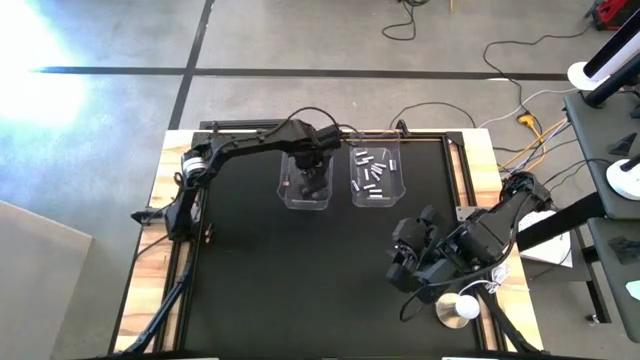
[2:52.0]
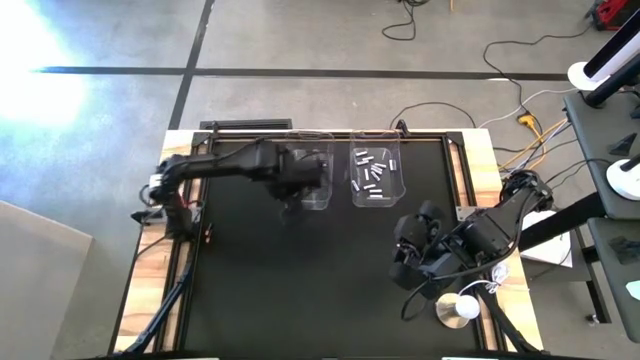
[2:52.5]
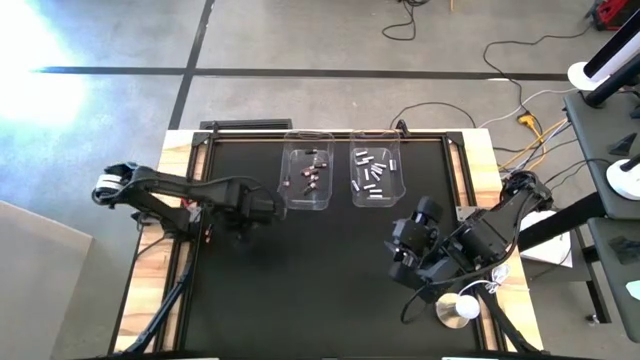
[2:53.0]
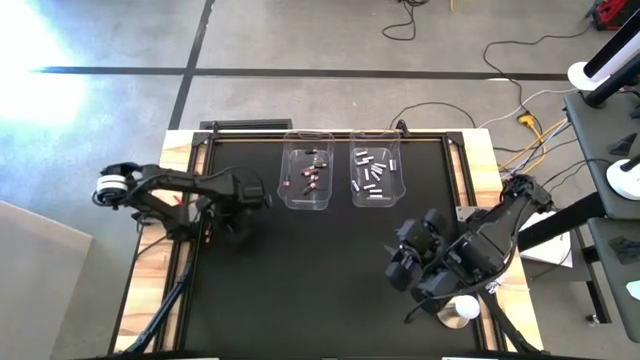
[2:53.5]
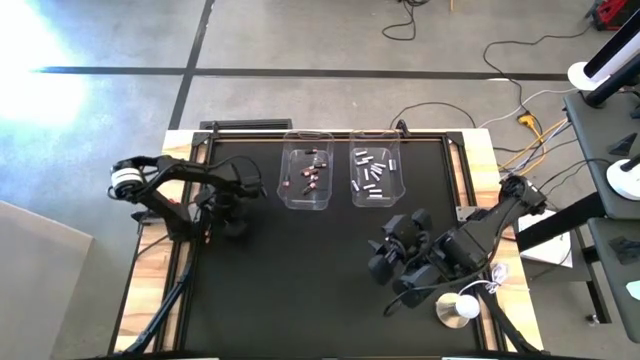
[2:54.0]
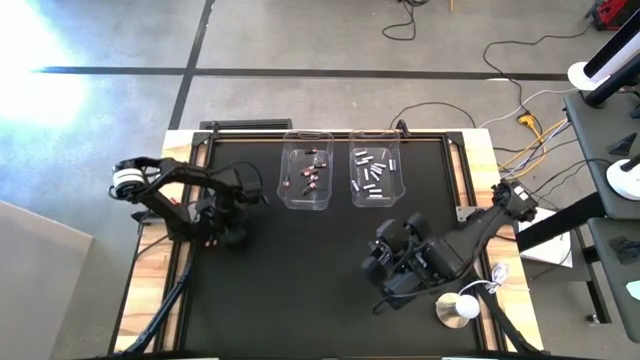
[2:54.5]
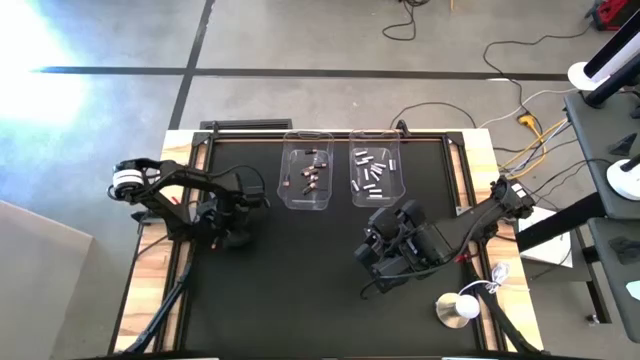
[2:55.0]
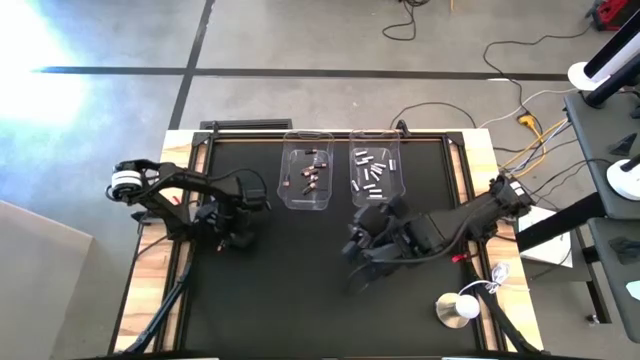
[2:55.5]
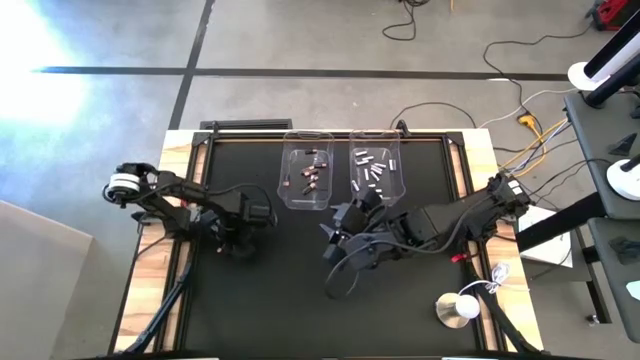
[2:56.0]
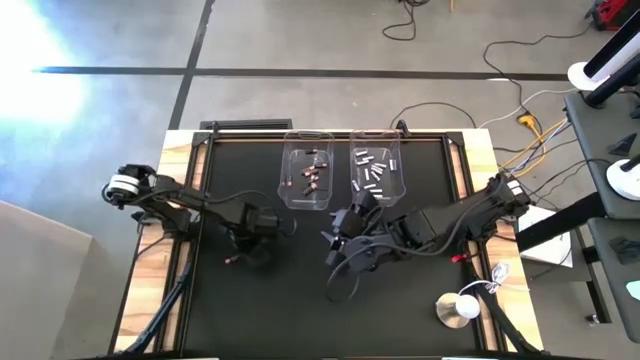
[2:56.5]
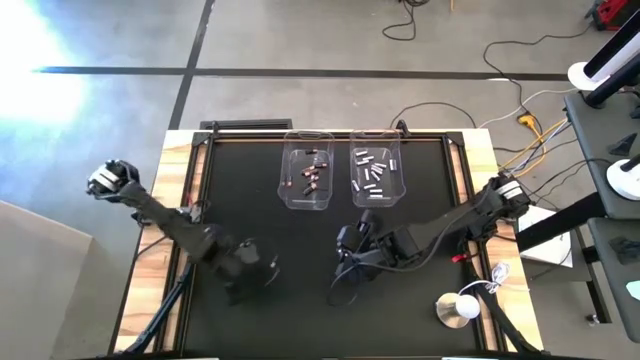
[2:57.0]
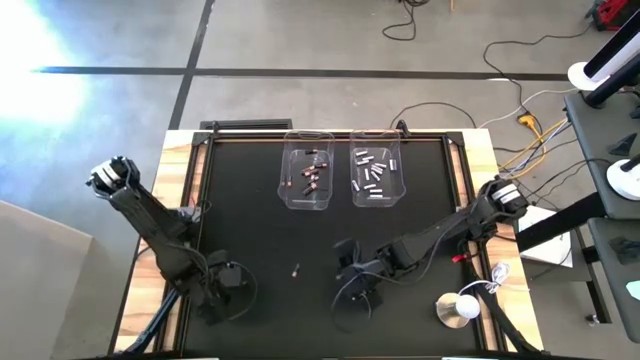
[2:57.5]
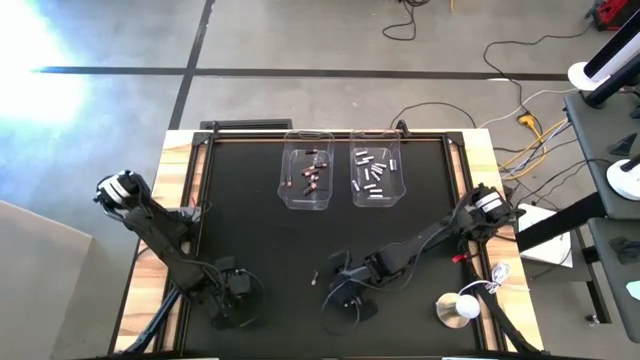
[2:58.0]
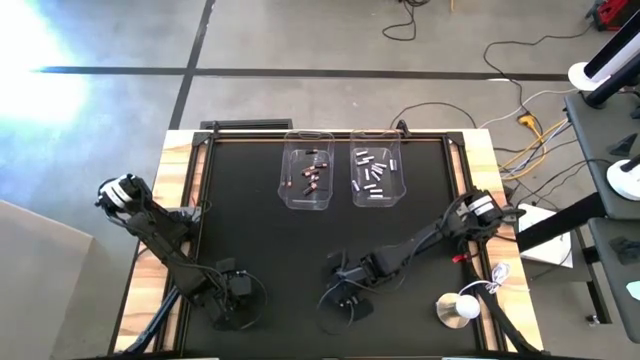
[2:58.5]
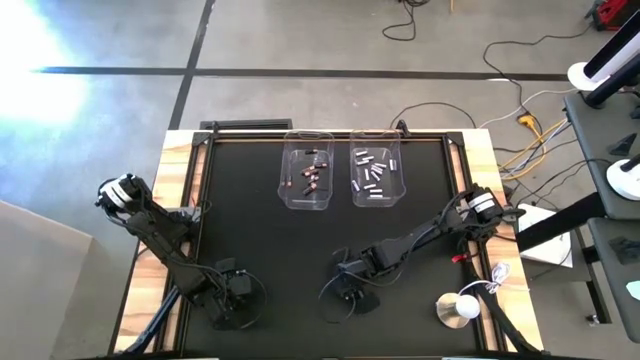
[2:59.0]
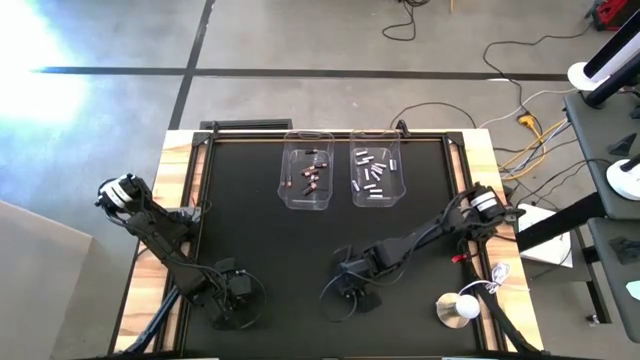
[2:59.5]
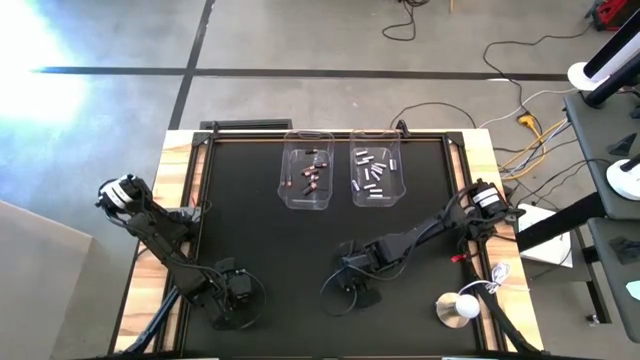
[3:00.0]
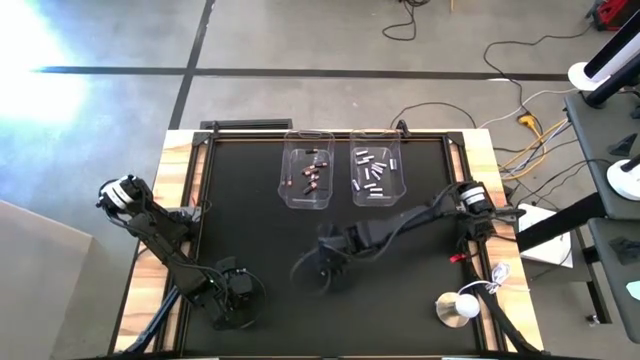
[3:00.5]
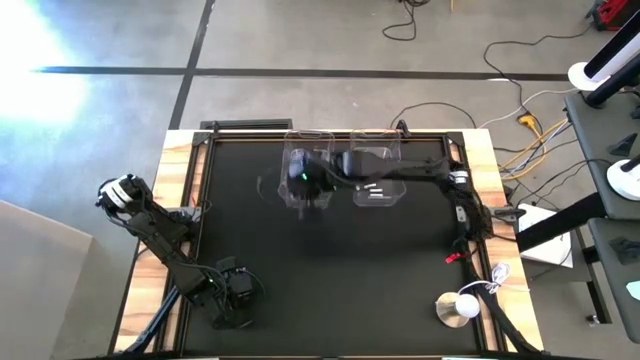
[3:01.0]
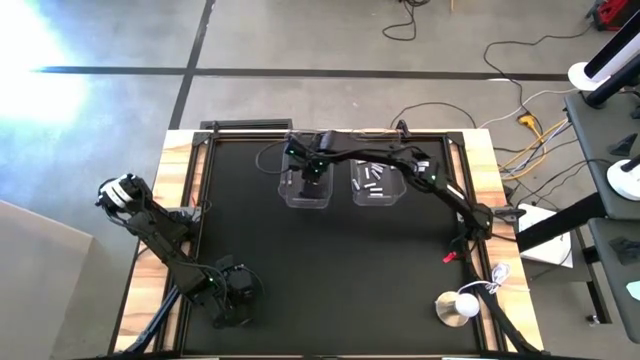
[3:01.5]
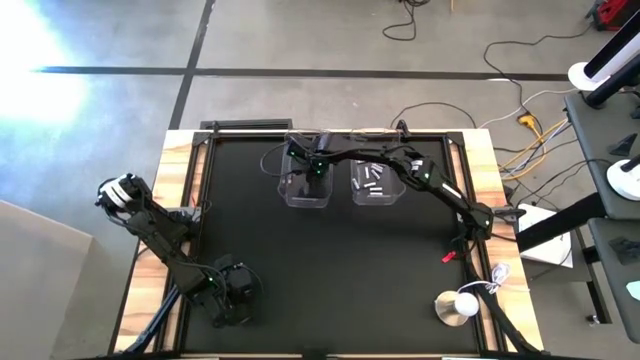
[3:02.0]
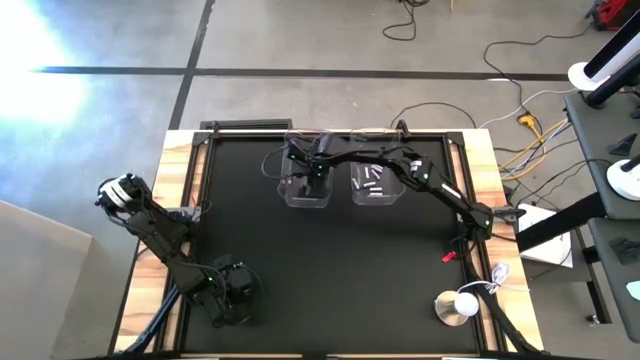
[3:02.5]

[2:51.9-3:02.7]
Task: Sort batteries
Put the black battery into the left transparent bin

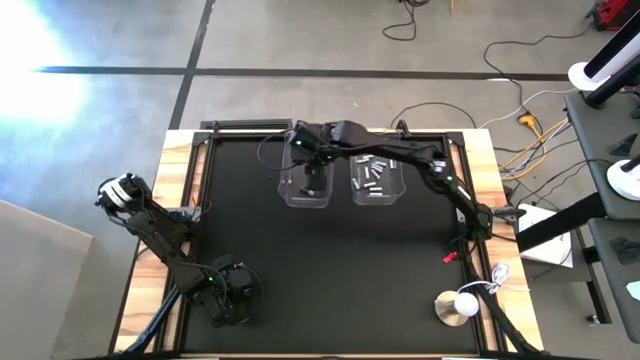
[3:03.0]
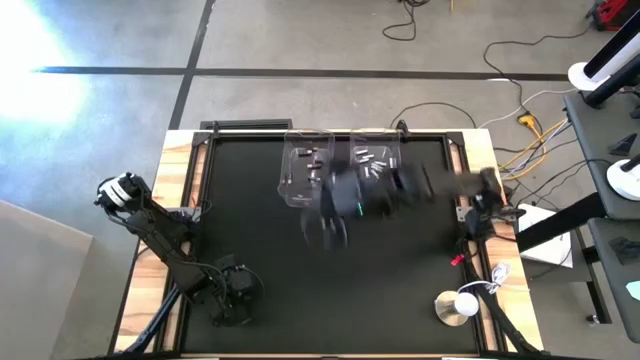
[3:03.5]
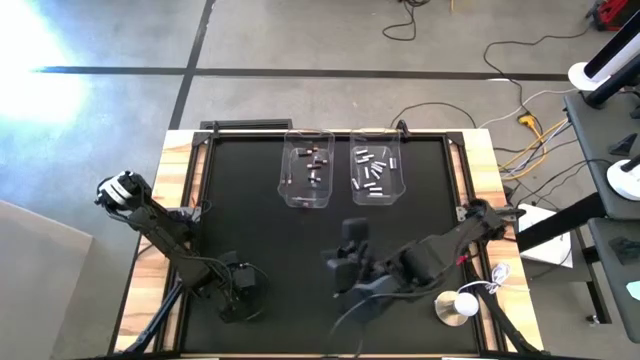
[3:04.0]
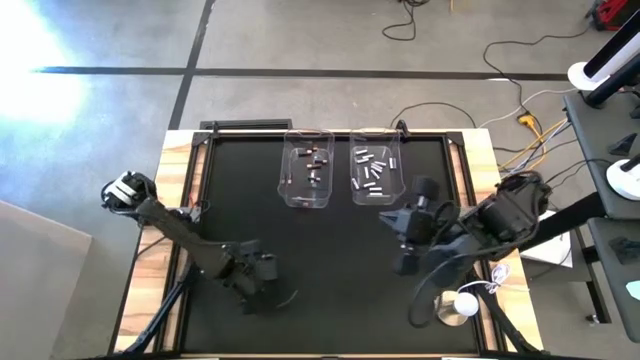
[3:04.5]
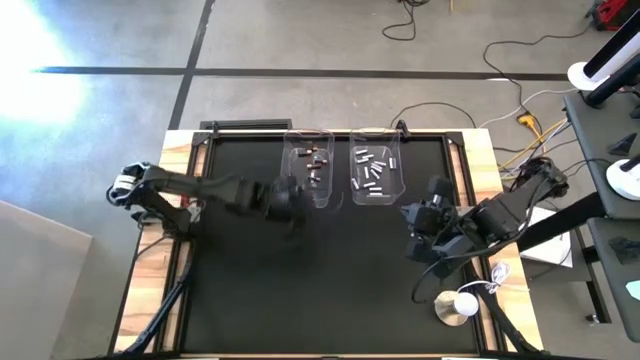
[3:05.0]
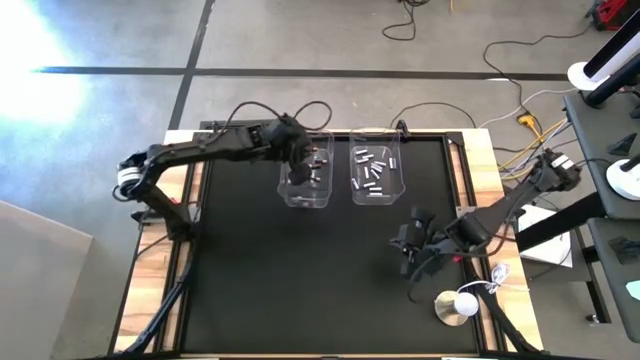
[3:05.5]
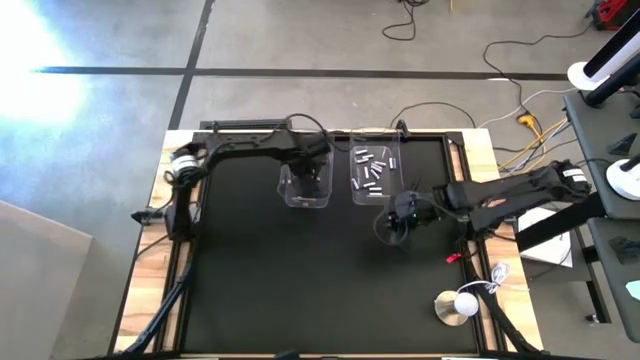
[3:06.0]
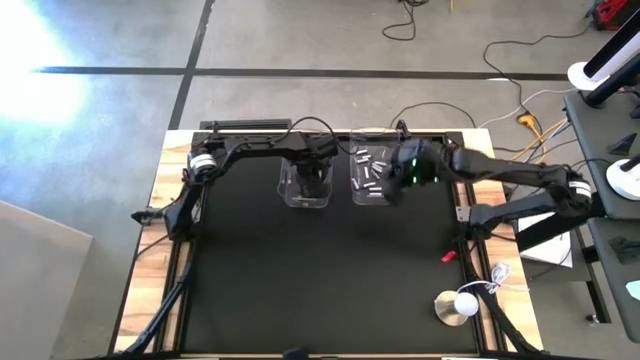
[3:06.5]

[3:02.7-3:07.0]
Put the black battery into the left transparent bin

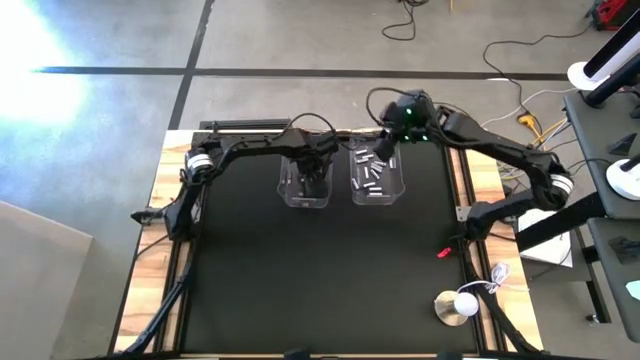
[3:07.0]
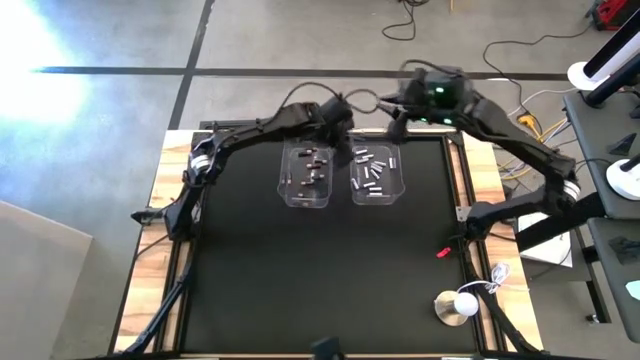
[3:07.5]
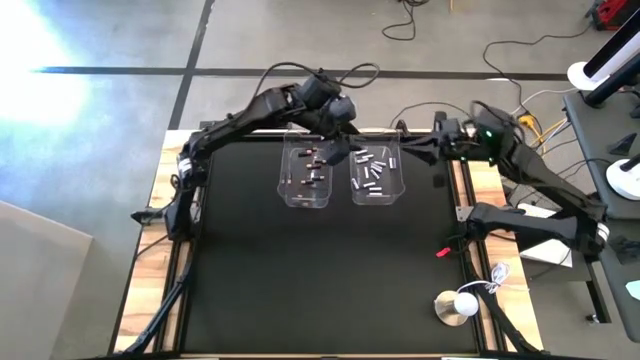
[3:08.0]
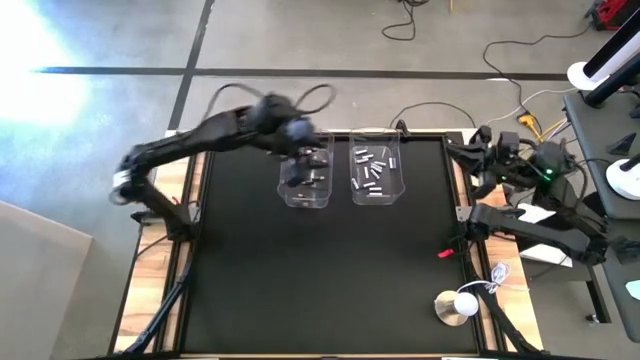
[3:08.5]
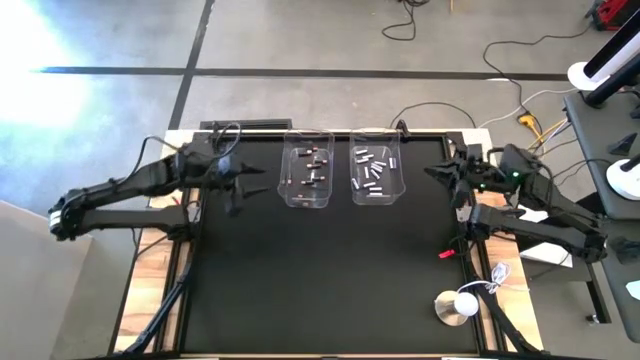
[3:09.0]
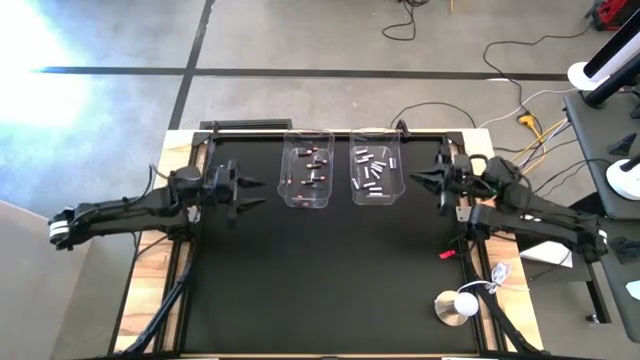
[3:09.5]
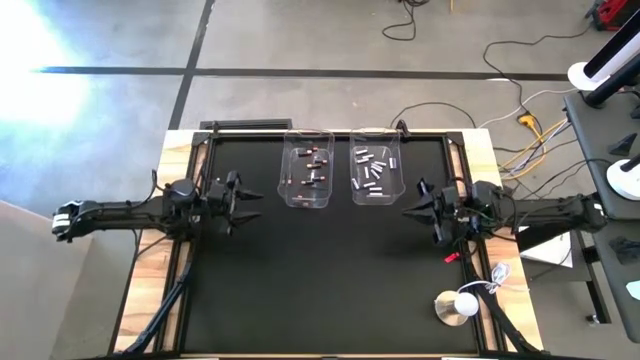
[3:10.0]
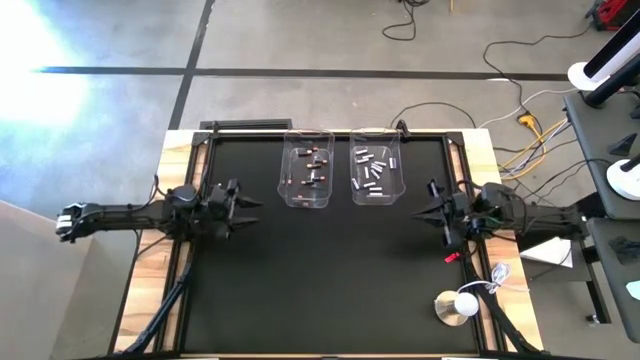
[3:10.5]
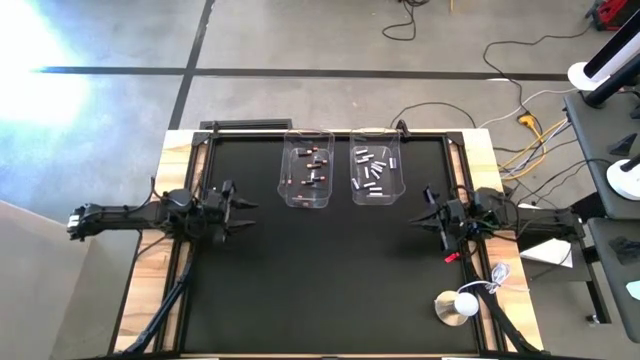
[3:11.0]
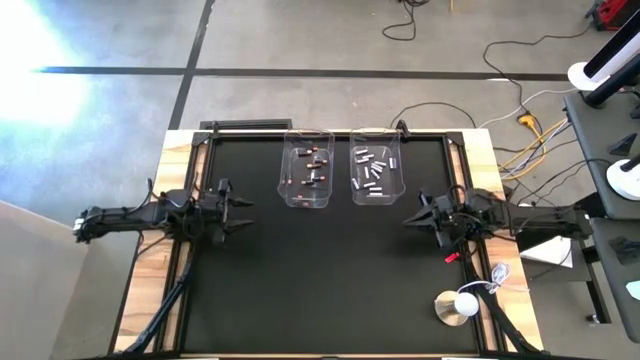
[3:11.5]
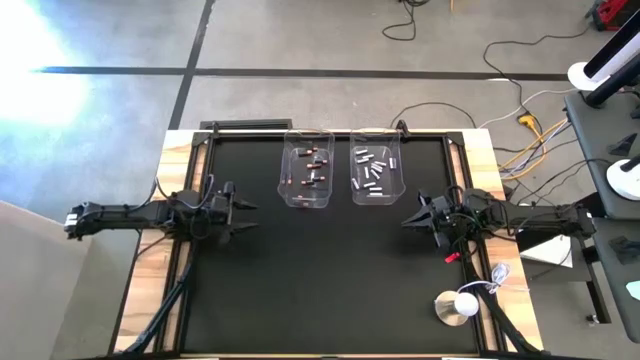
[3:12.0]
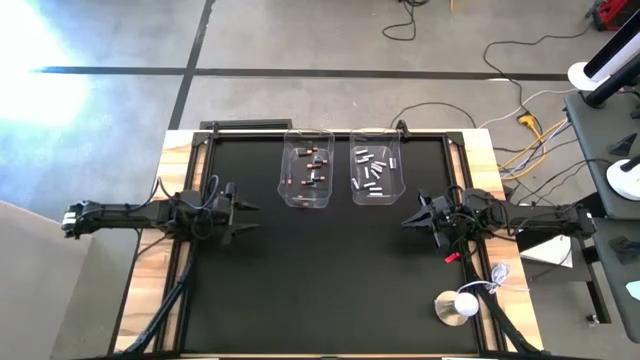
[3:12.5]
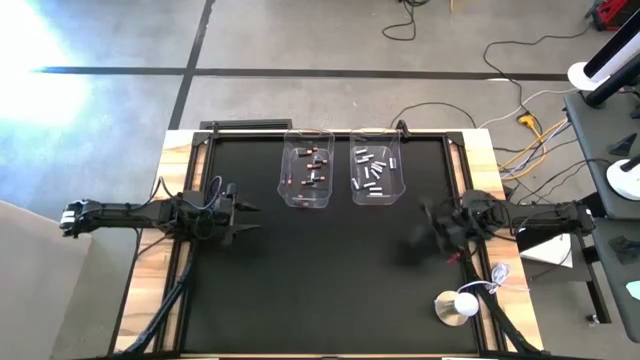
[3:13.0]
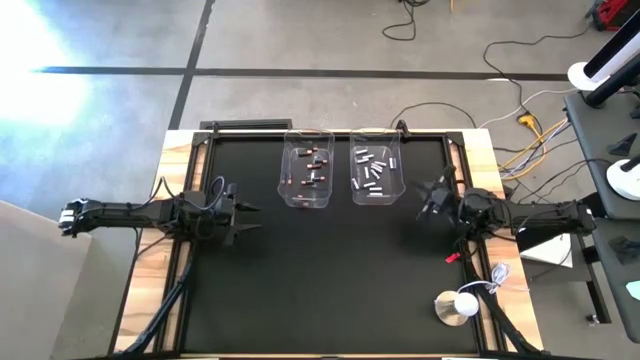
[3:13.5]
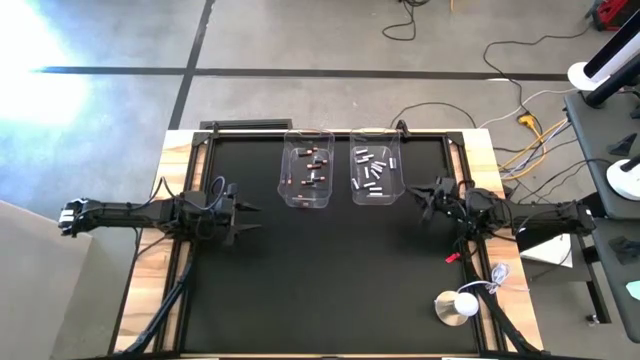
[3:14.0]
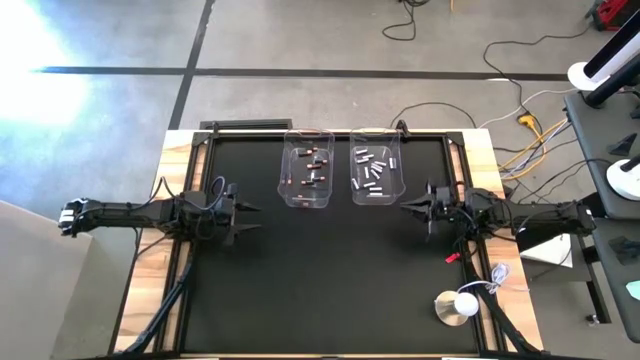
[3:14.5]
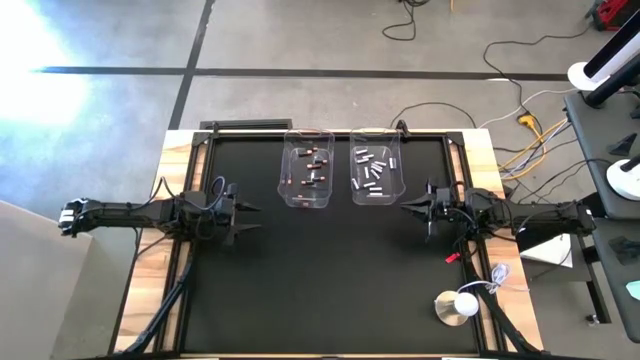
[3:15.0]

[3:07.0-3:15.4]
Return to Home Position
